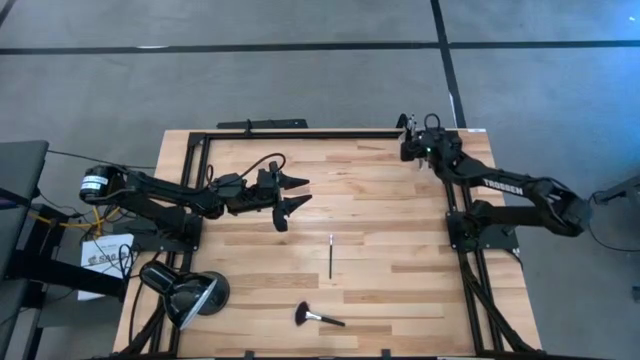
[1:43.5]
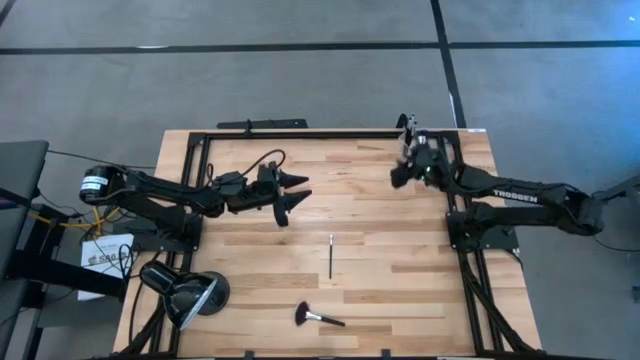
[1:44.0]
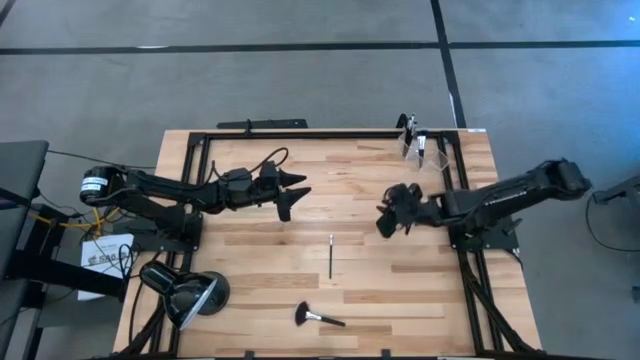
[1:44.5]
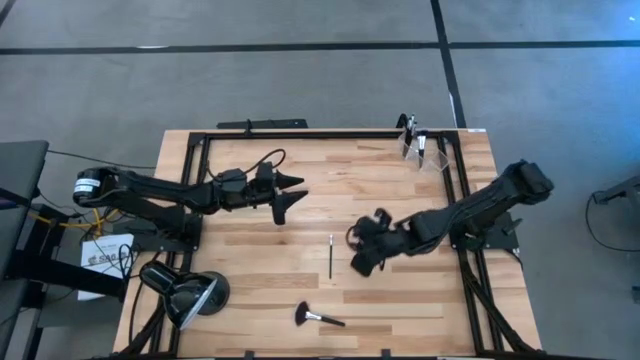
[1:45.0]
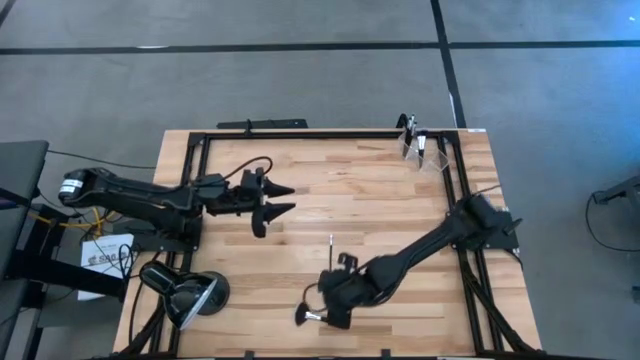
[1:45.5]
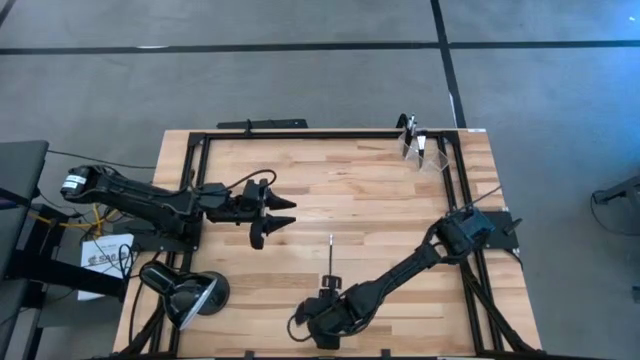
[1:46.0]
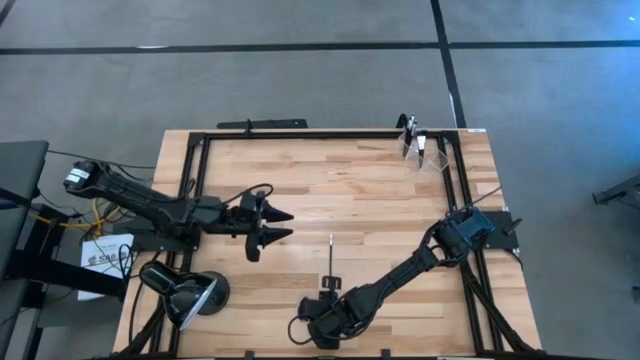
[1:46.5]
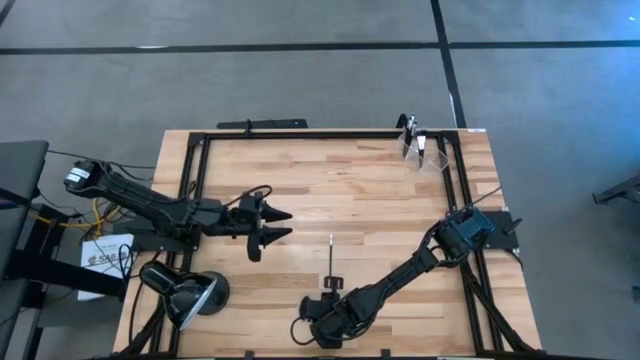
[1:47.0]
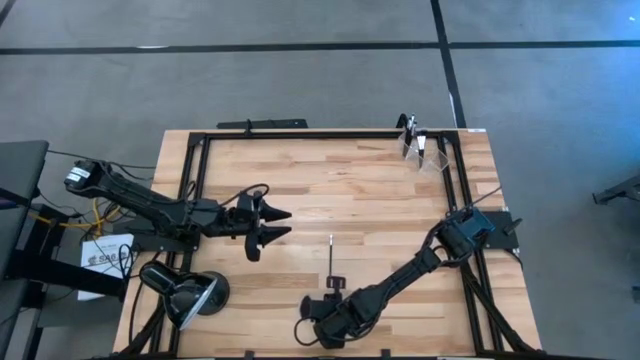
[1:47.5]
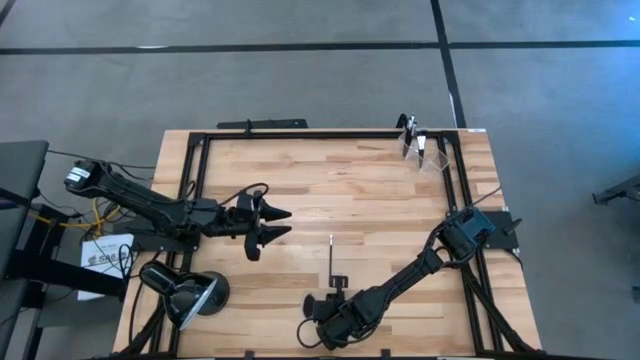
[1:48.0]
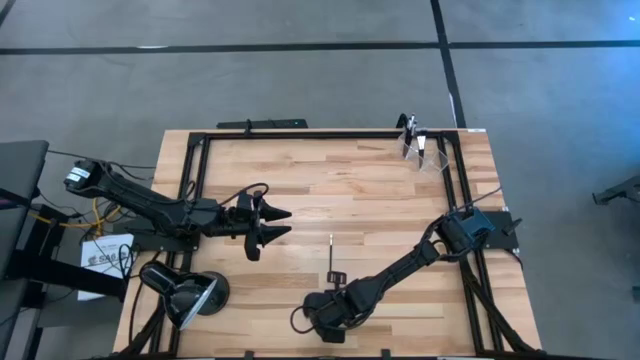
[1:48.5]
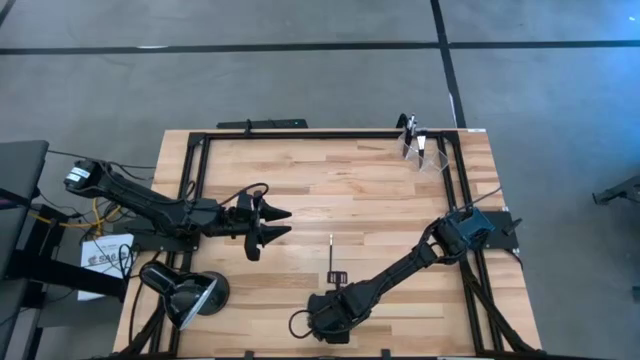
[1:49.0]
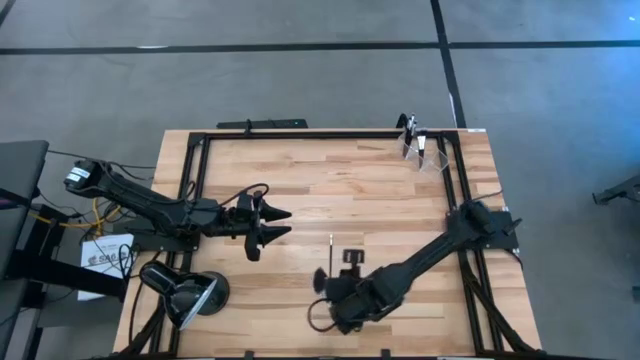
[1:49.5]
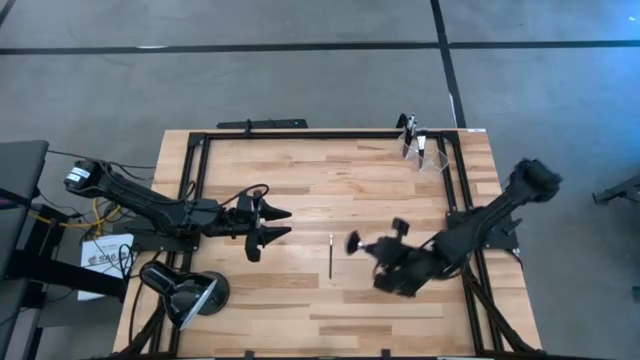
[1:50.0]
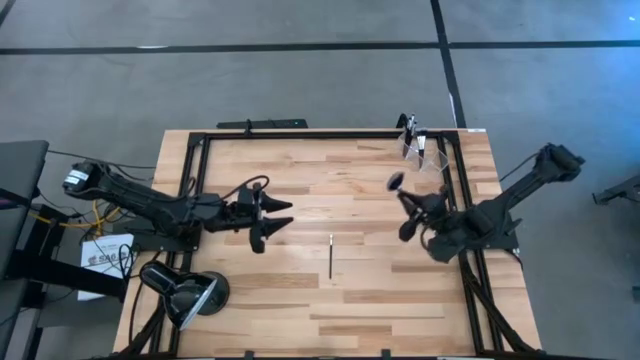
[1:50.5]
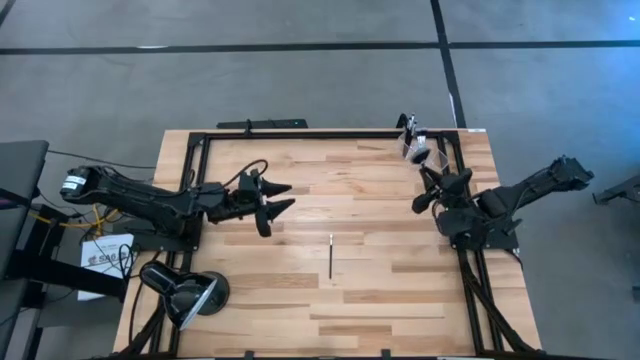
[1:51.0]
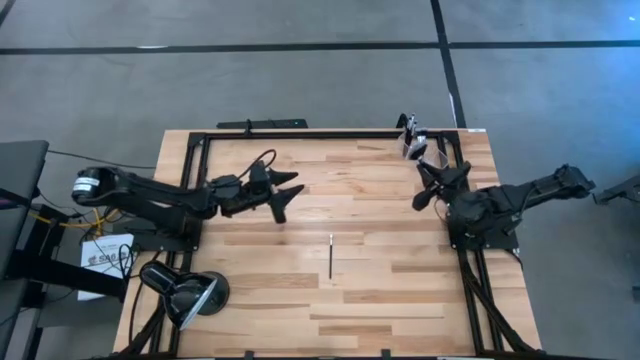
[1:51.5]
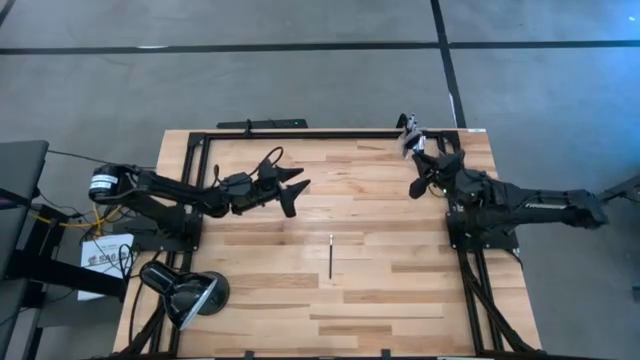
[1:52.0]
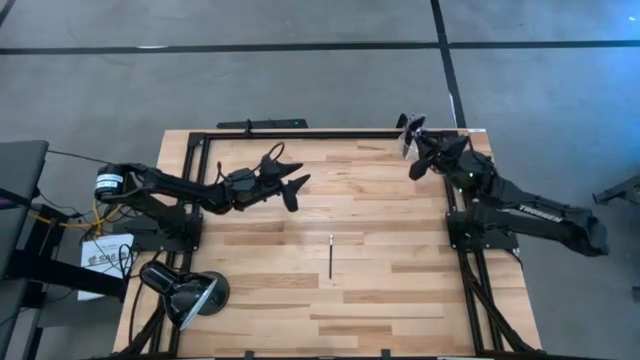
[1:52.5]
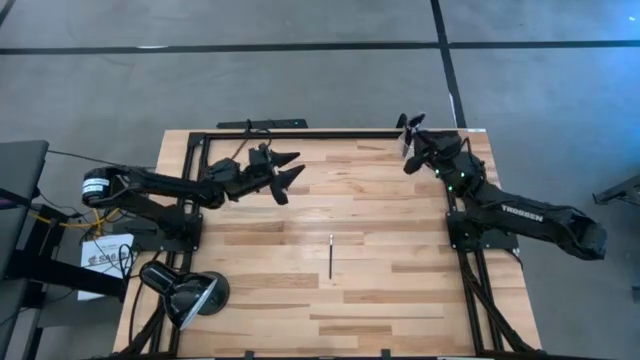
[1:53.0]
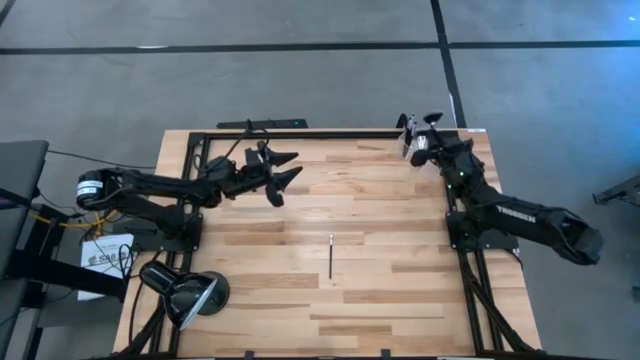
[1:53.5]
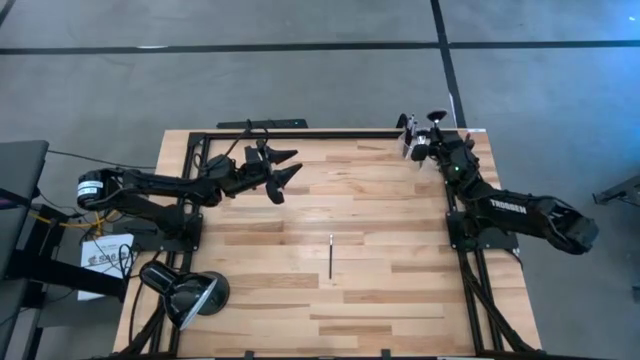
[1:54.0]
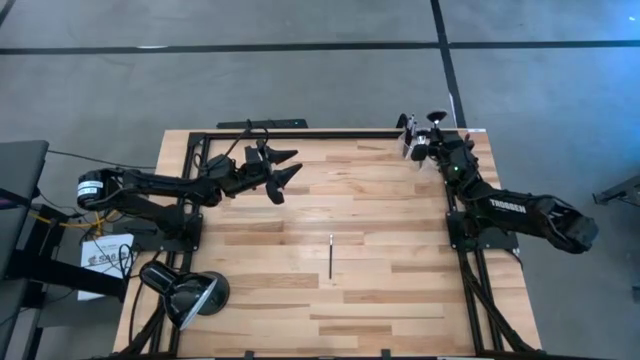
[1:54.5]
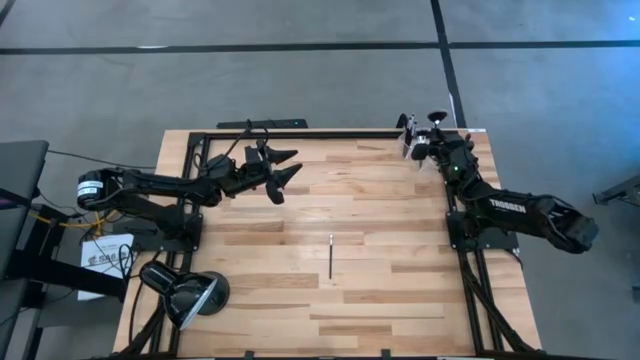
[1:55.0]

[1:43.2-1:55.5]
Task: Put items in baskets/containers
Put the black highlighter brush into the transparent organizer

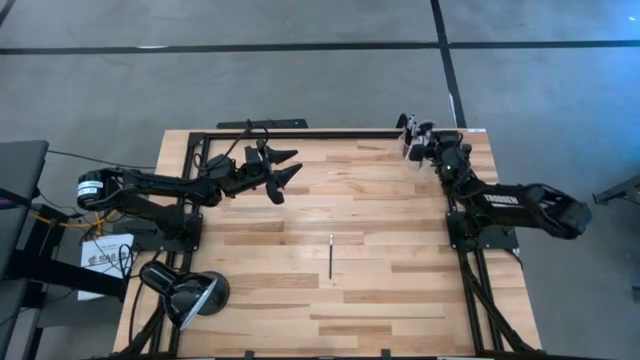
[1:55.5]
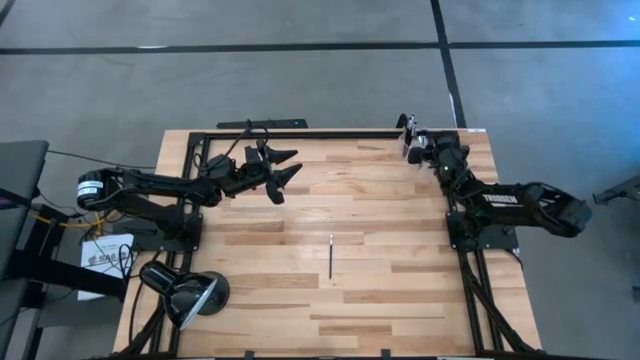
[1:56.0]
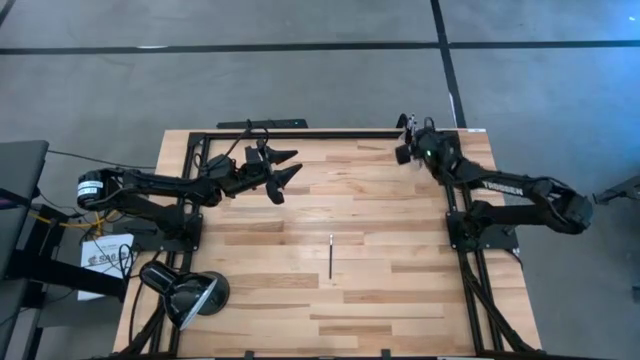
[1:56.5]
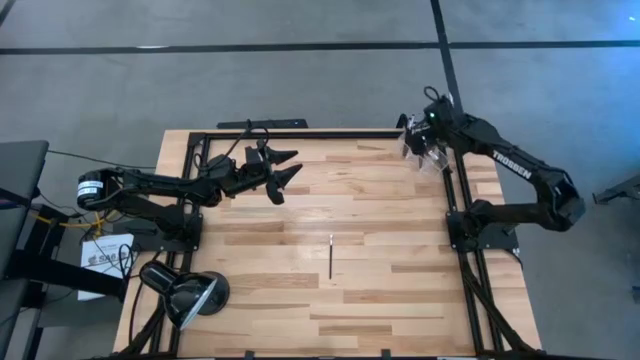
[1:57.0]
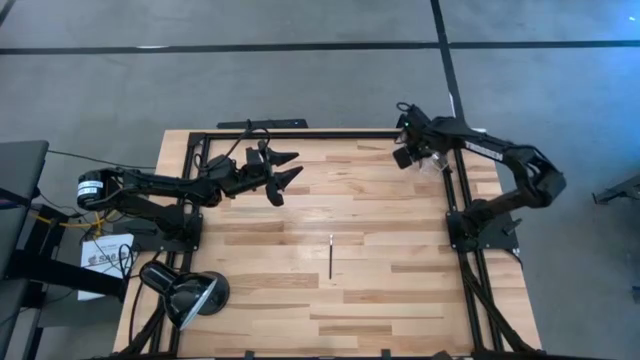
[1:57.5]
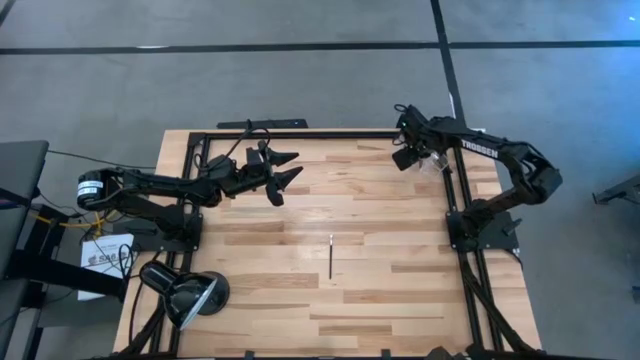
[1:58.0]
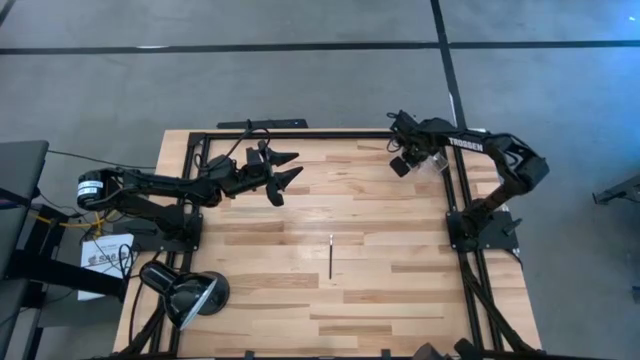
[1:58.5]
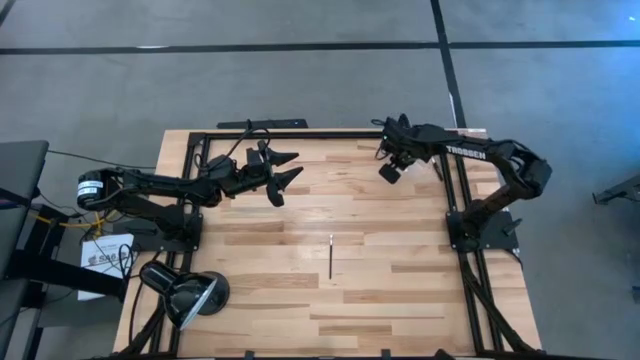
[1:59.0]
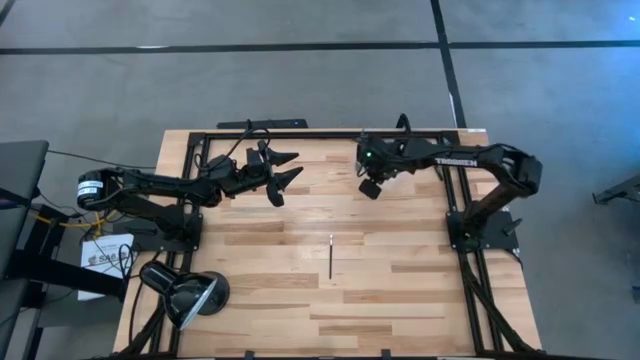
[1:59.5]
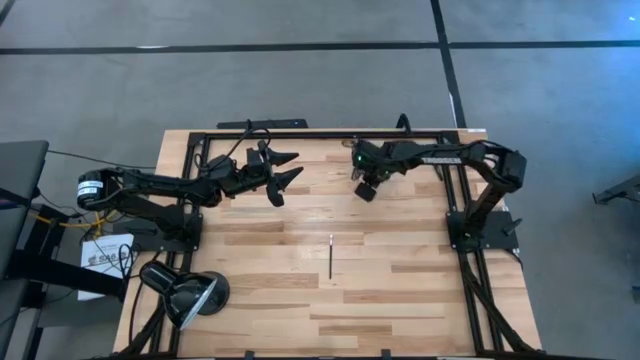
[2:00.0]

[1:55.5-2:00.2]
Adjust the transparent organizer

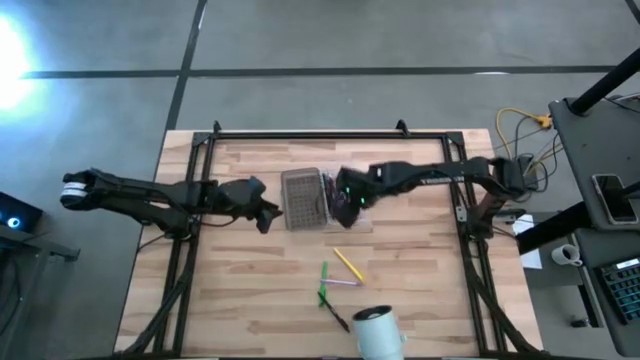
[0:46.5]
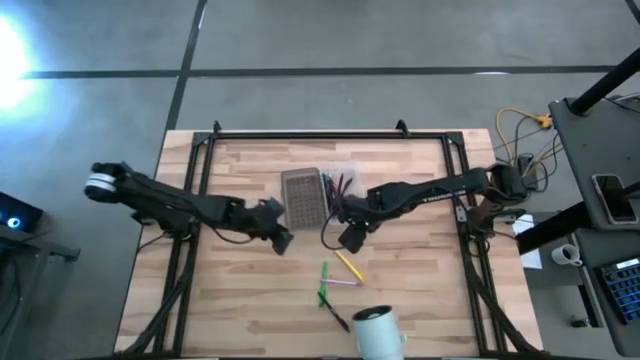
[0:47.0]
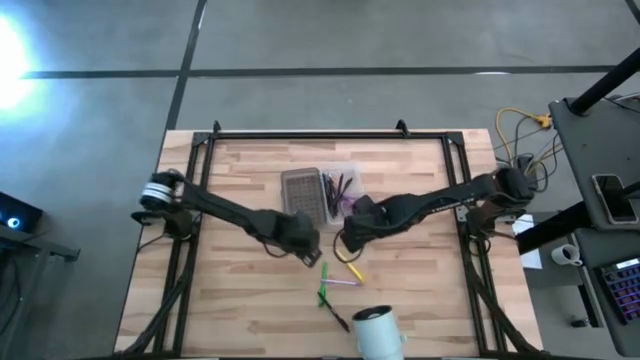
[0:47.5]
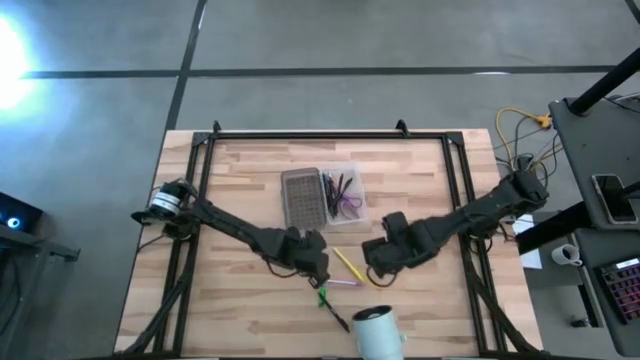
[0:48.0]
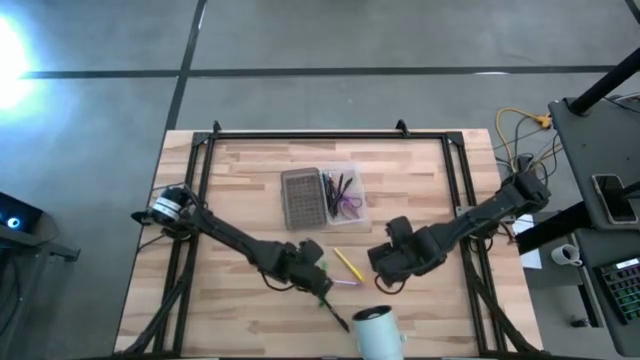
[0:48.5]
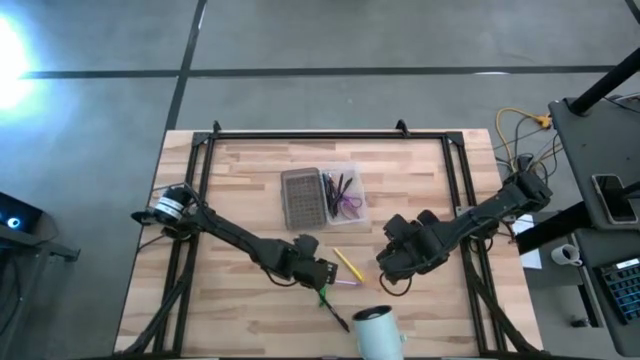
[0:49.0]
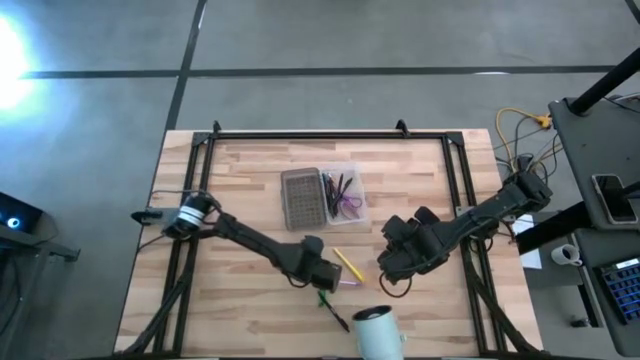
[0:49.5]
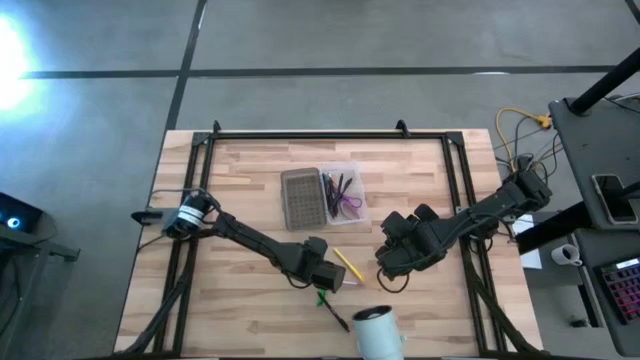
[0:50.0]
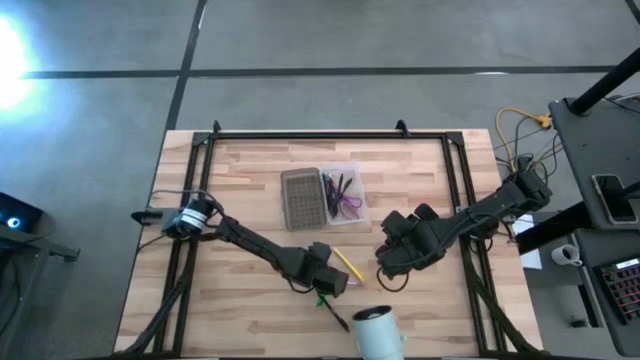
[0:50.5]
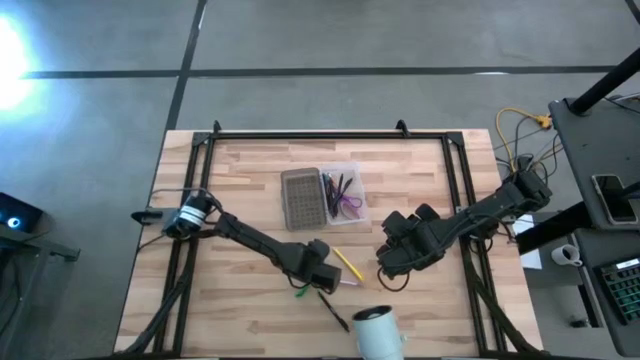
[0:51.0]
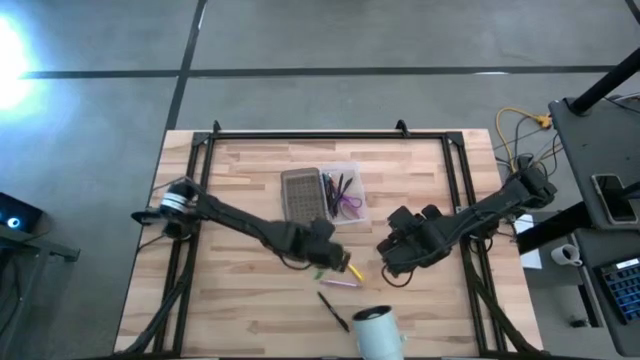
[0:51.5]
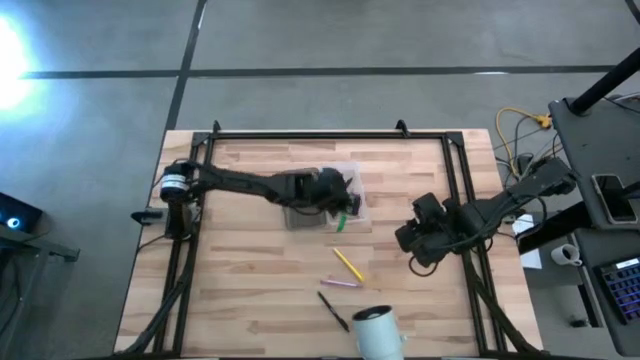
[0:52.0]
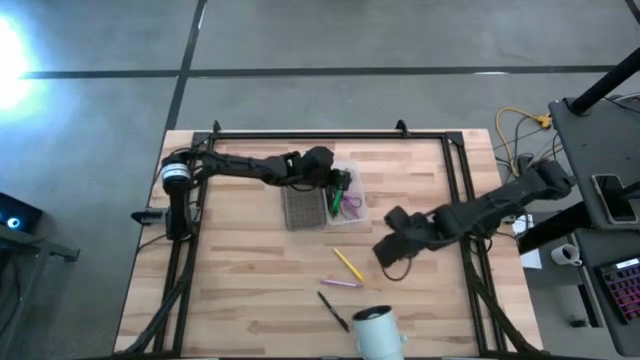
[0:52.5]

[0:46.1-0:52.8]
Task: Pick & place school supplies into a supply box
Put the green pen into the gray supply box
